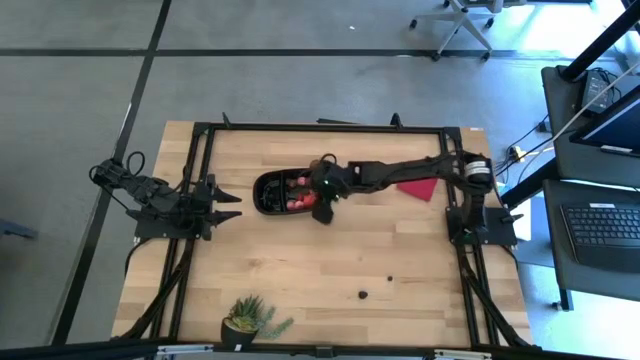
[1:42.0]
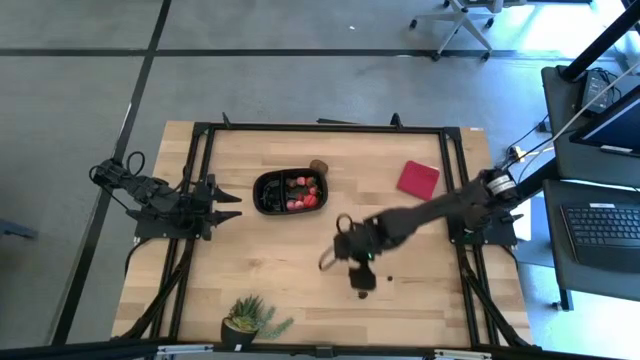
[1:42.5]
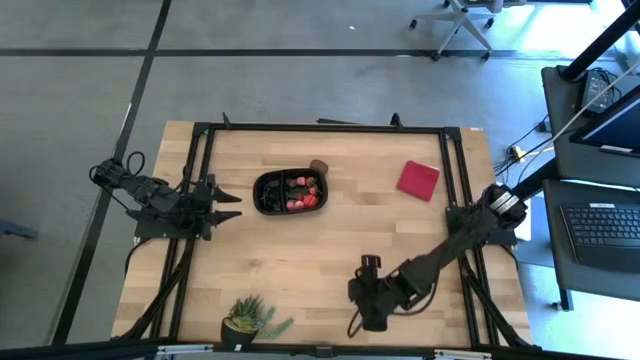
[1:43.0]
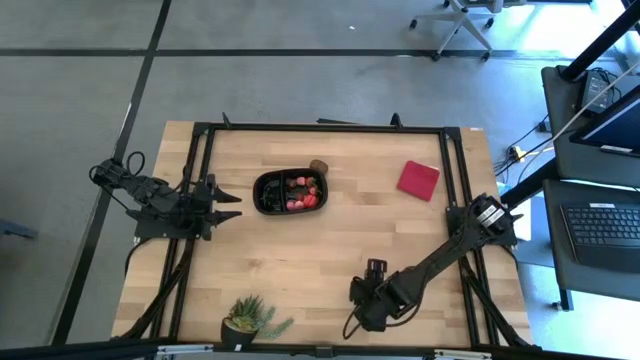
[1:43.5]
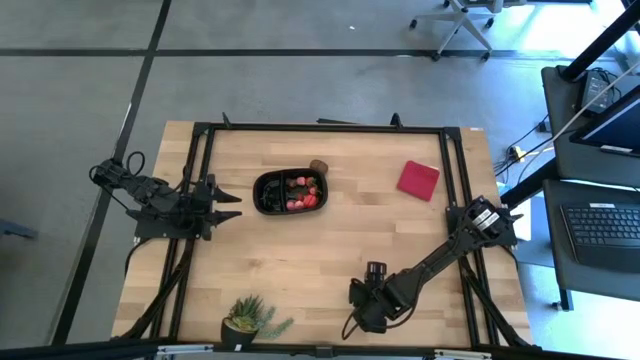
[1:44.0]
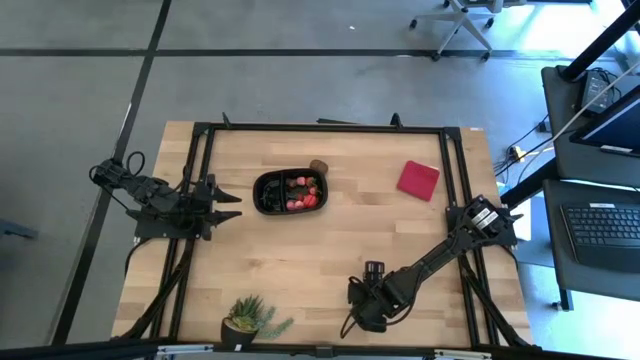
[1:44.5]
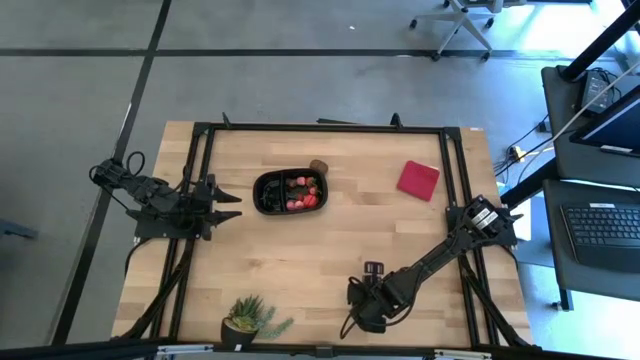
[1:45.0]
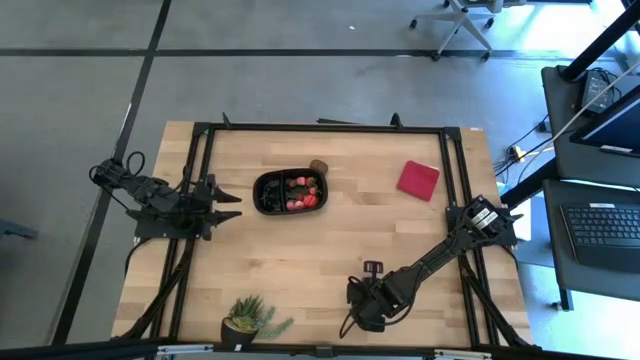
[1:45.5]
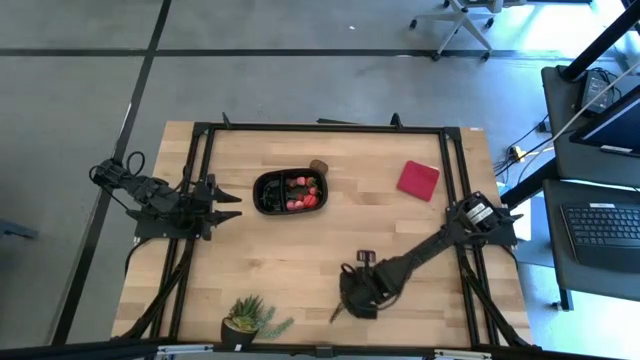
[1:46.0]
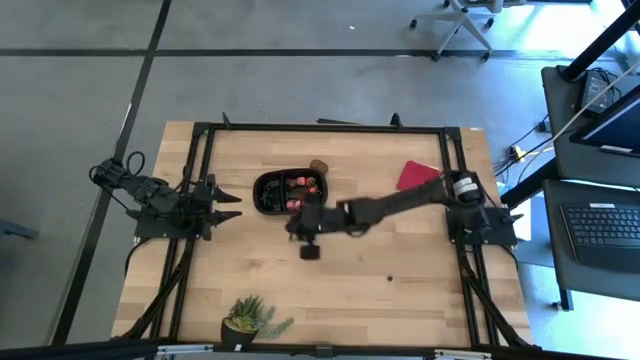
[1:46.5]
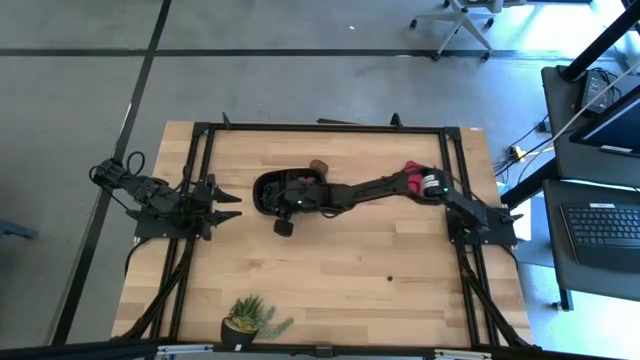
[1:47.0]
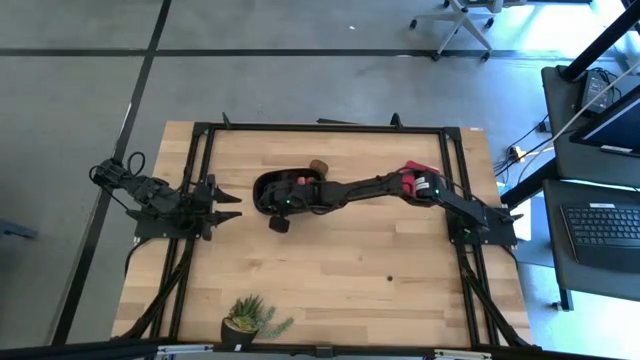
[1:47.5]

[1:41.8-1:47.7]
Task: Pick and placing Produce into tupperware
Put the blackberry into the black bin

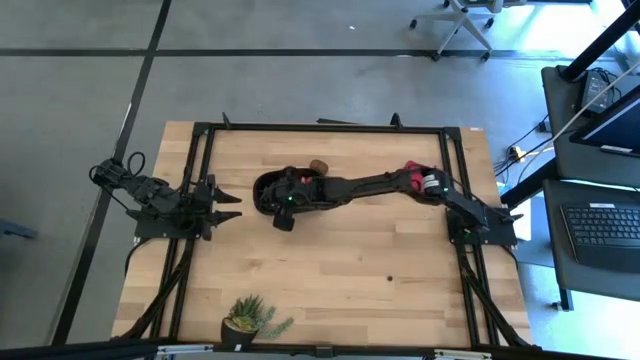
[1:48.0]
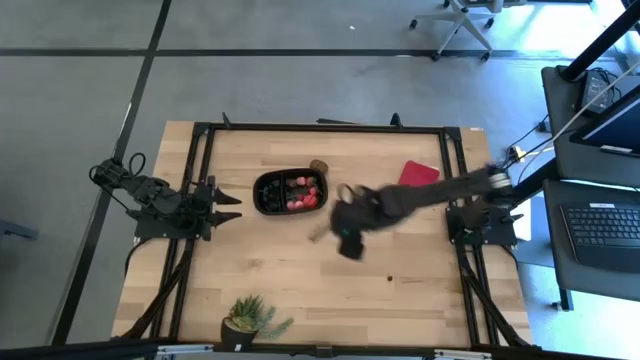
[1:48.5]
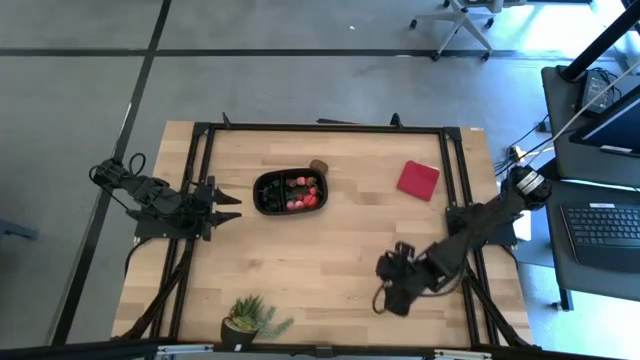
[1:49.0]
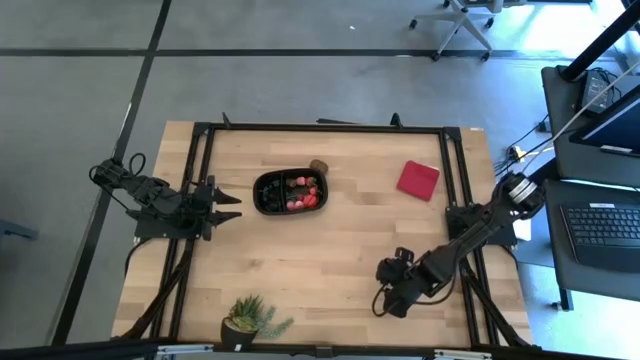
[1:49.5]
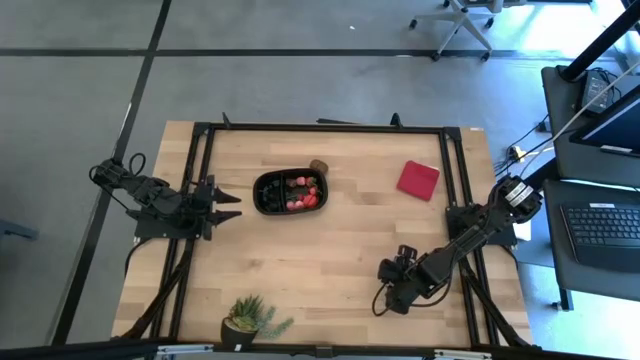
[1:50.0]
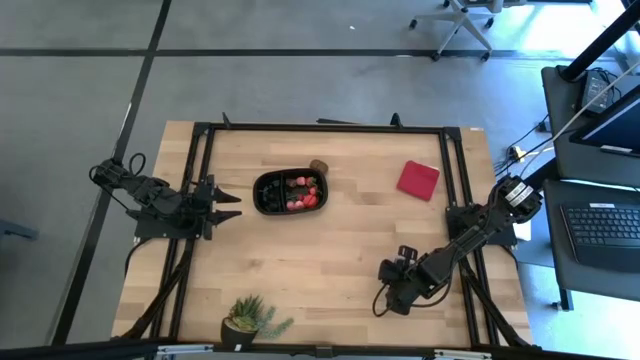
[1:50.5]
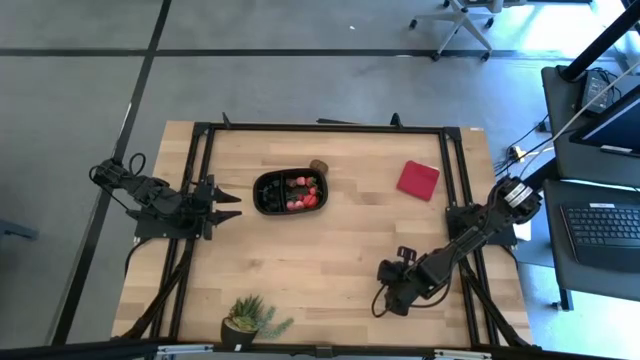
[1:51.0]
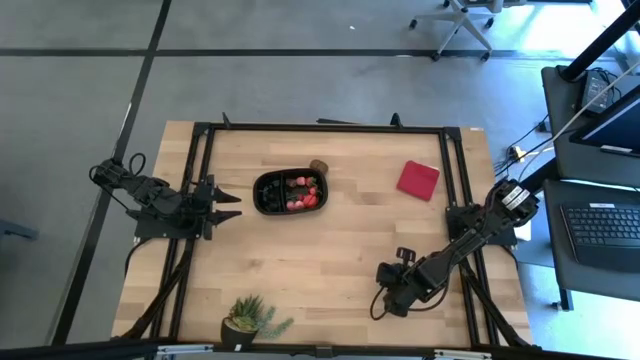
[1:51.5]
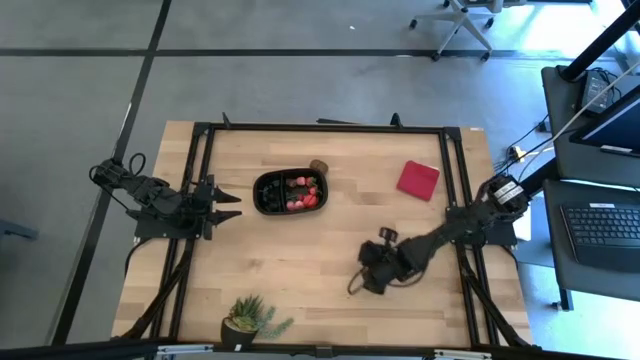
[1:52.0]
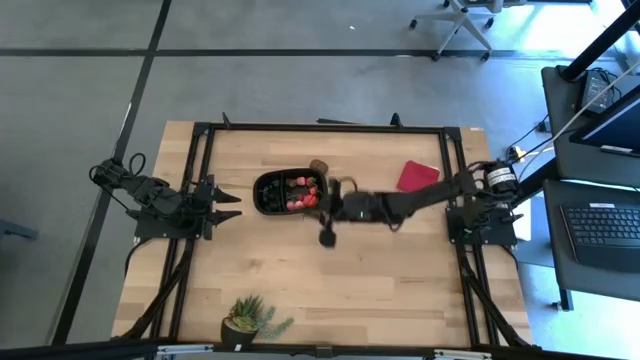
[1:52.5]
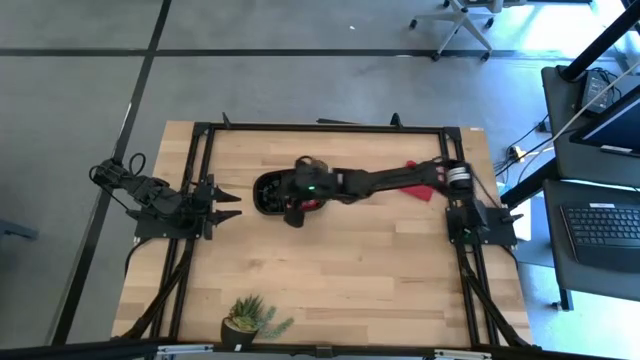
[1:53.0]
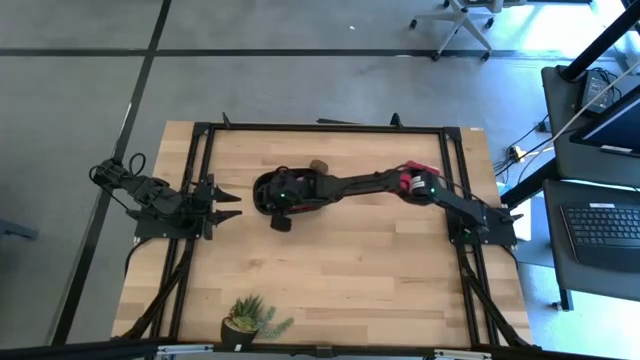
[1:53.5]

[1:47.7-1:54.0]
Put the blueberry into the black bin

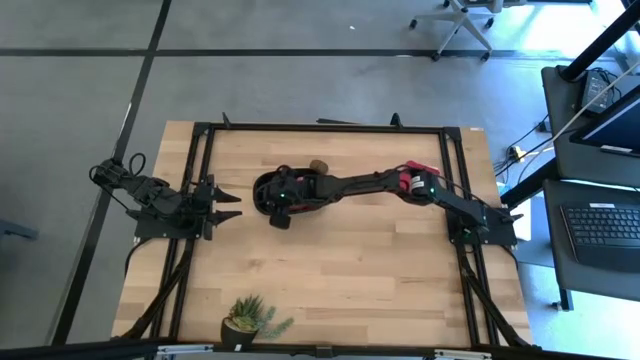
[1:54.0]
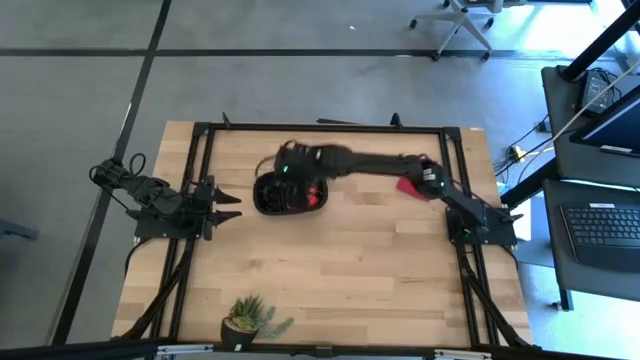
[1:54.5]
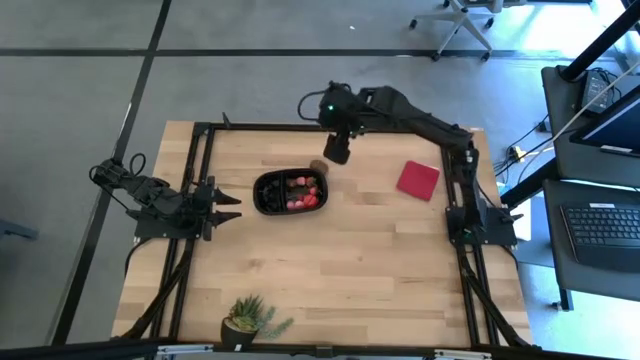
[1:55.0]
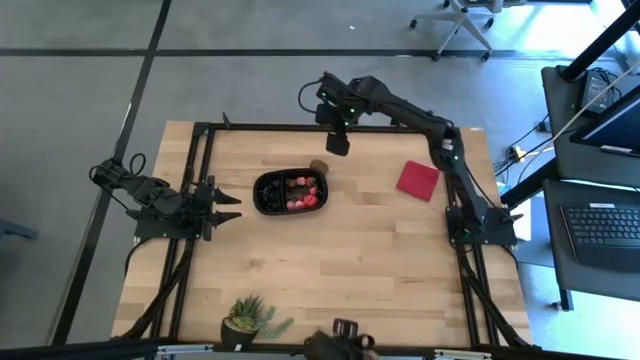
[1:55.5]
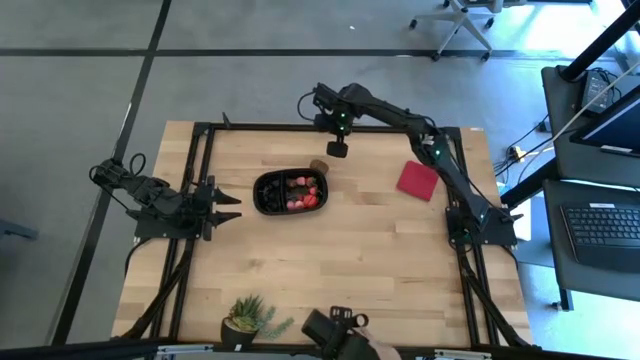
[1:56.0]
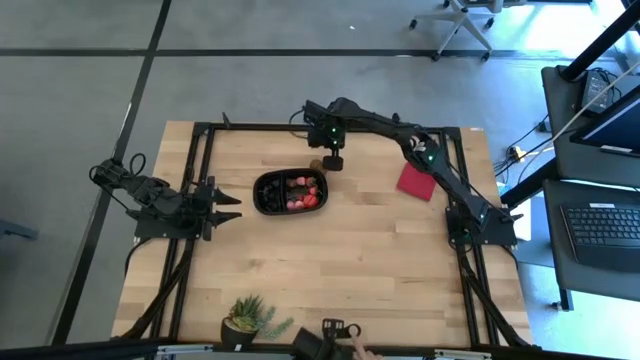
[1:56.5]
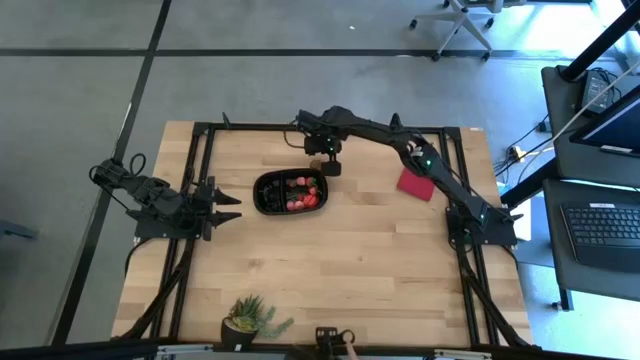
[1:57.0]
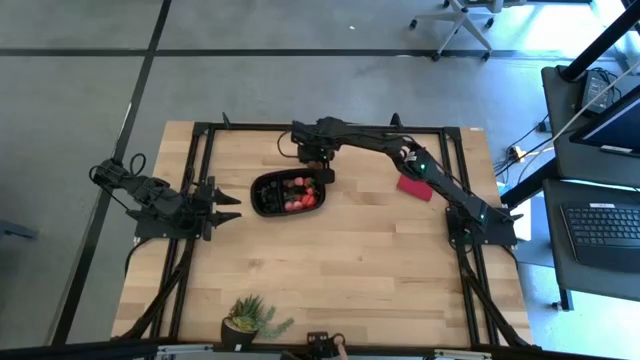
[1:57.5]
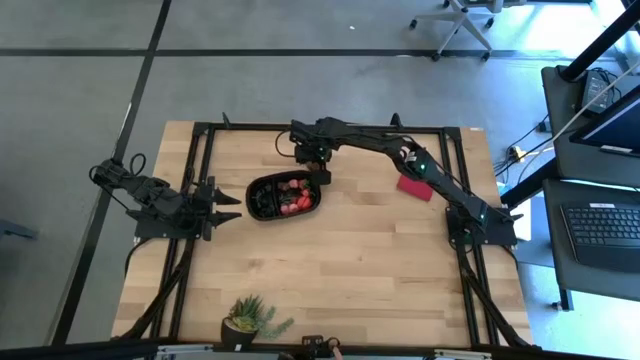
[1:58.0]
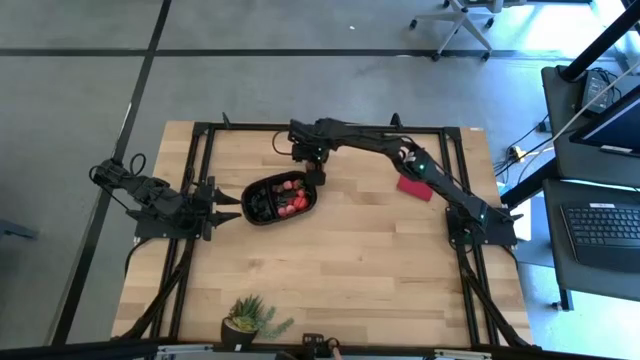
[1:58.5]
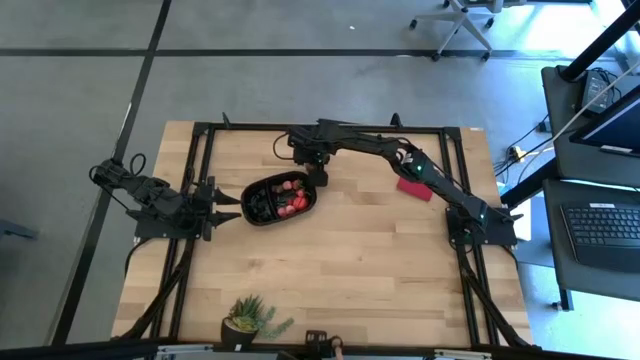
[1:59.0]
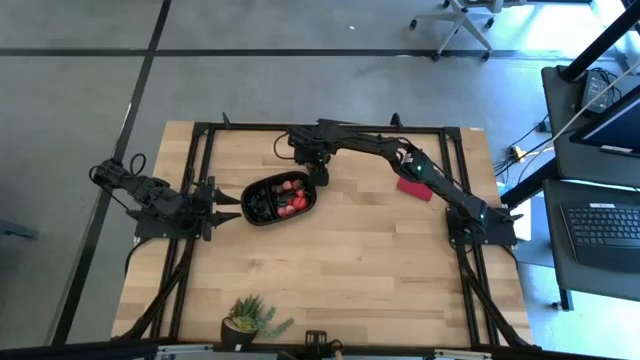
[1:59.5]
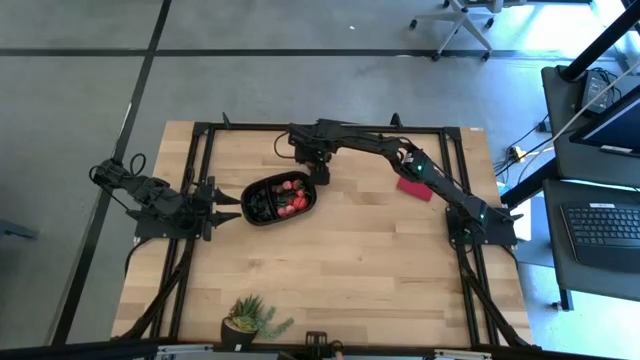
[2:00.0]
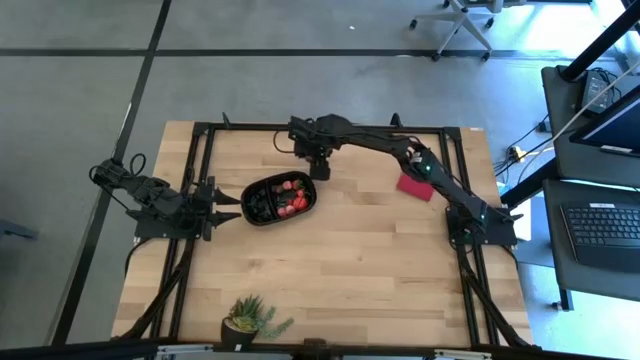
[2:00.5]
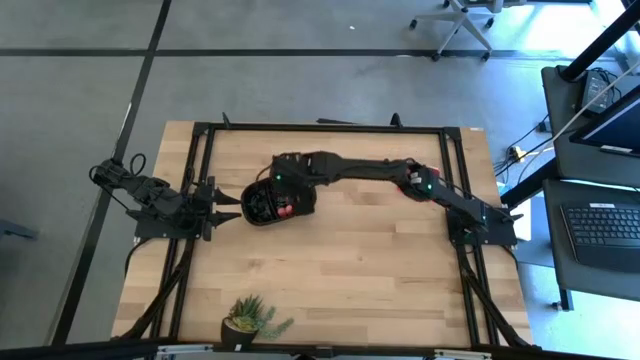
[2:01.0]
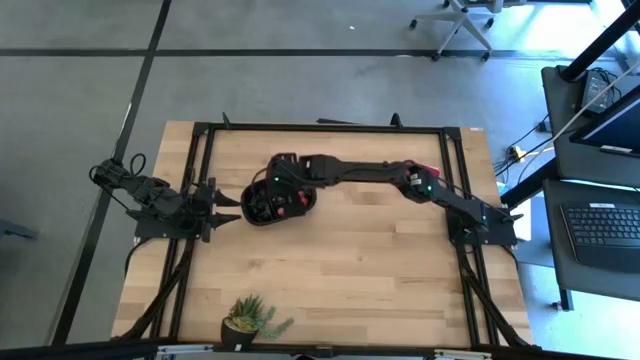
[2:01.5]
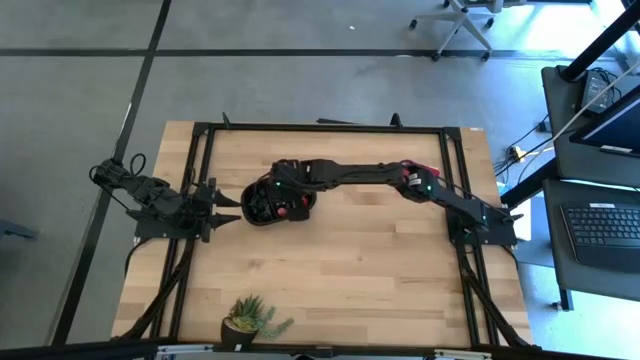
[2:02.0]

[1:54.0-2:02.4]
Put the brown kiwi into the black bin

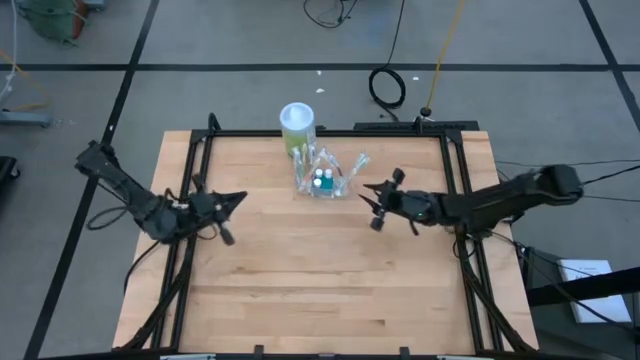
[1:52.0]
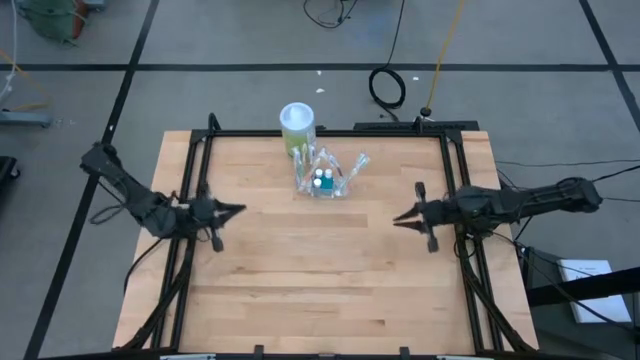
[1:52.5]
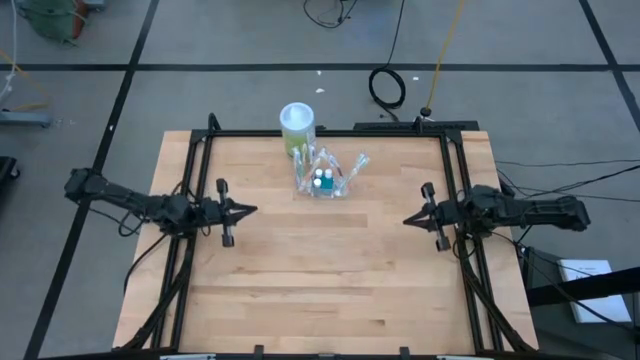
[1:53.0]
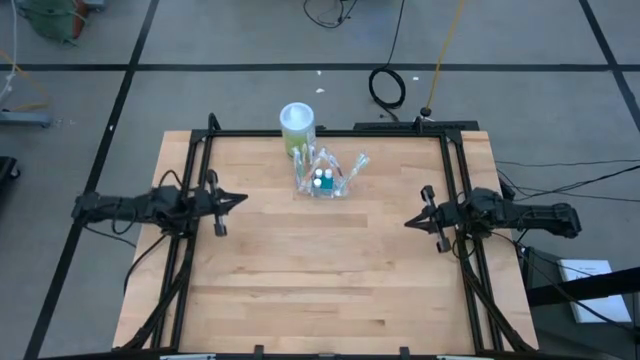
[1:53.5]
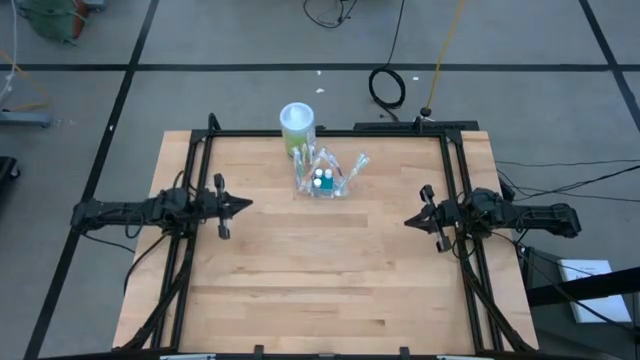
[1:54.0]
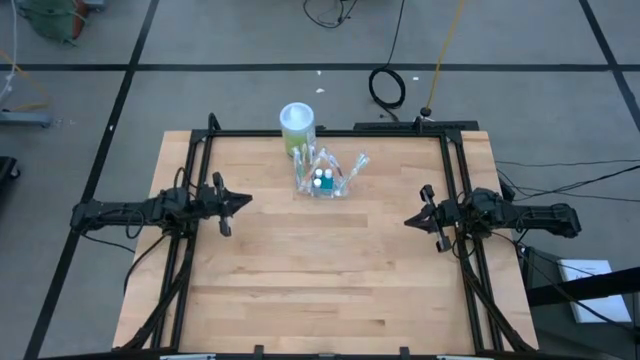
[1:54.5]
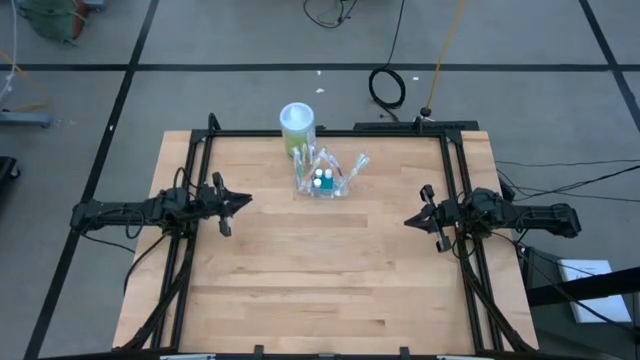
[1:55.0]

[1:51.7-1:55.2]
Task: Pick & Place toothbrushing station
Return to Home Position
